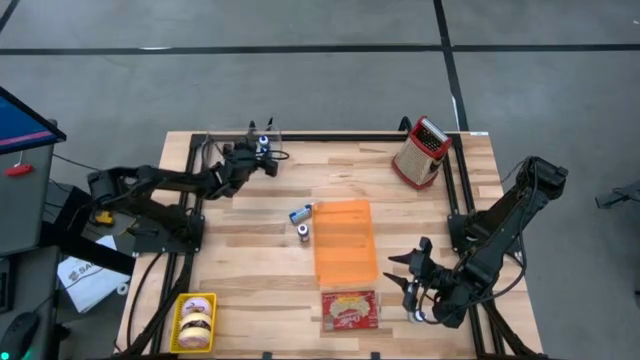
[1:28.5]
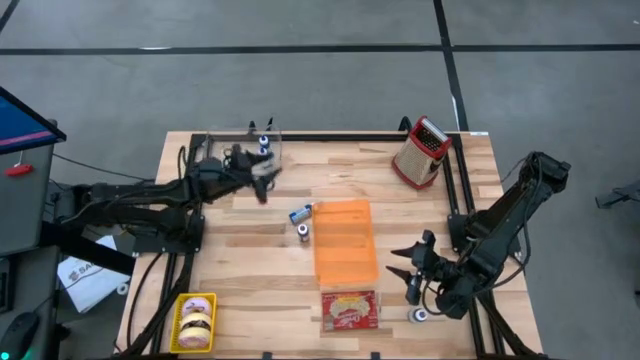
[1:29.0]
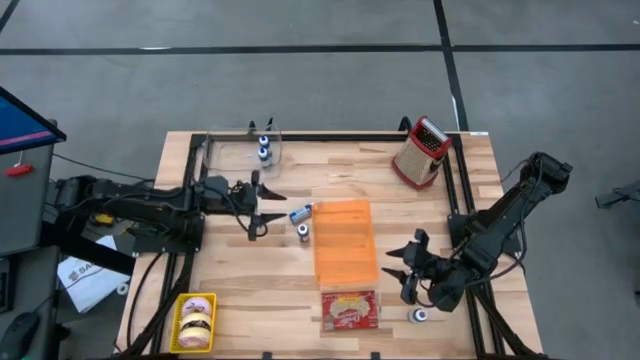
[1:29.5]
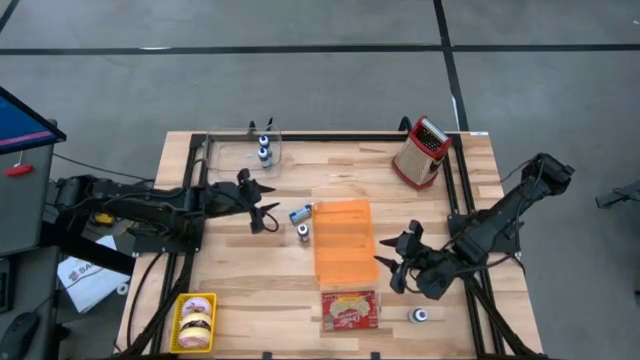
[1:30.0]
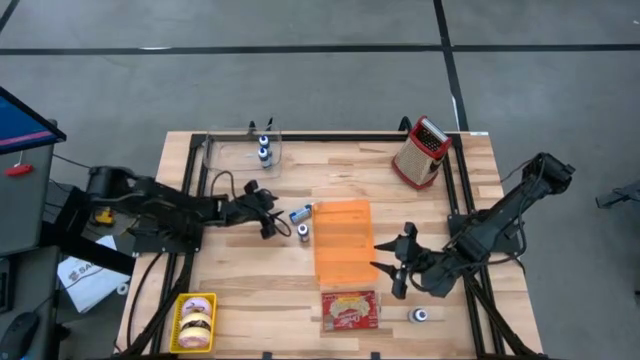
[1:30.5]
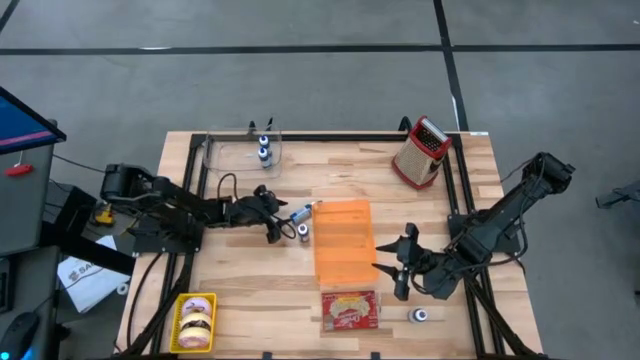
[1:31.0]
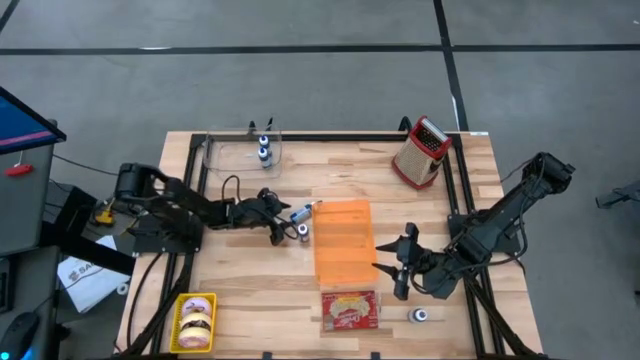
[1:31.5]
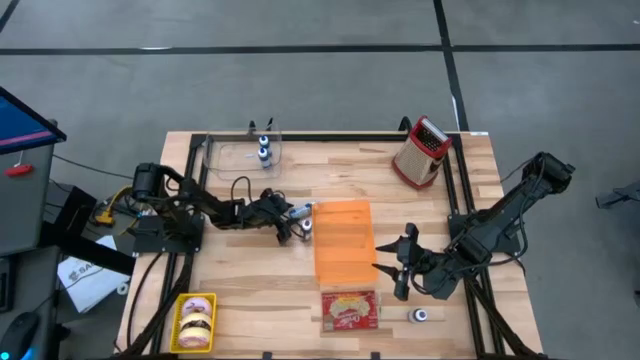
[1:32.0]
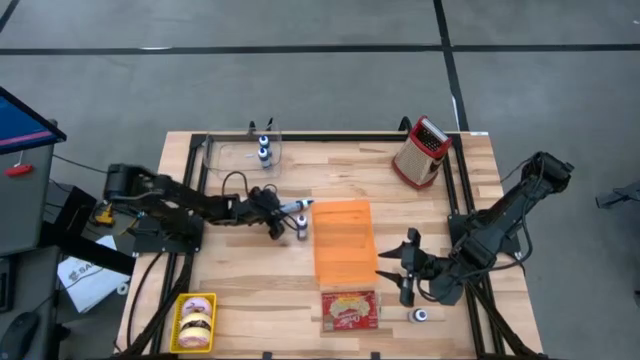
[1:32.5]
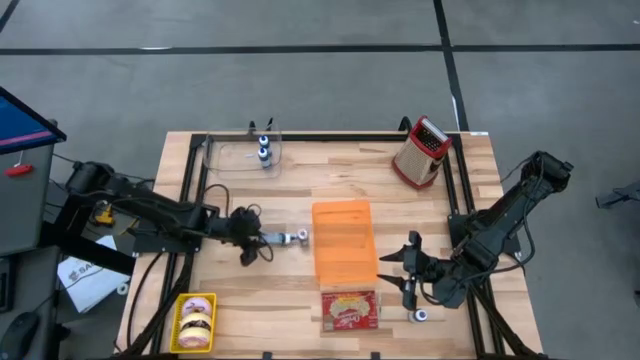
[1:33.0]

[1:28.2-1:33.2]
Task: Pick & Place Food Item
Move the blue food coloring bottle to the center left of the table

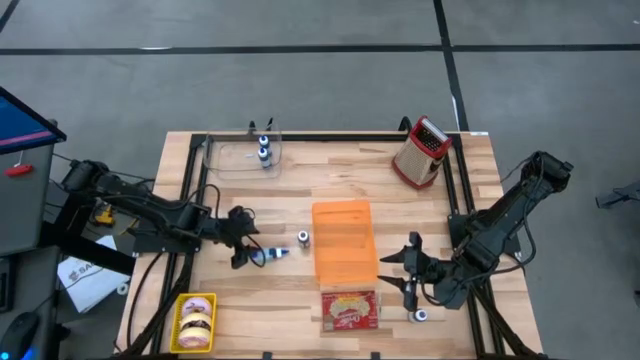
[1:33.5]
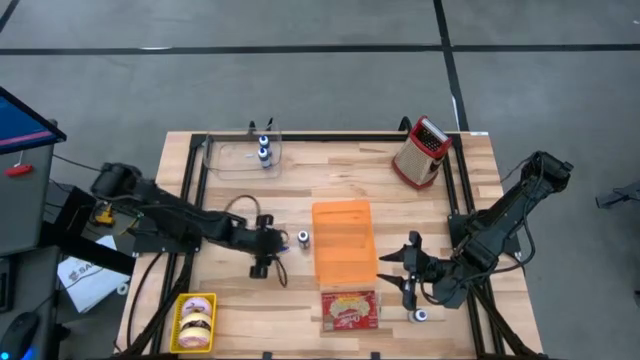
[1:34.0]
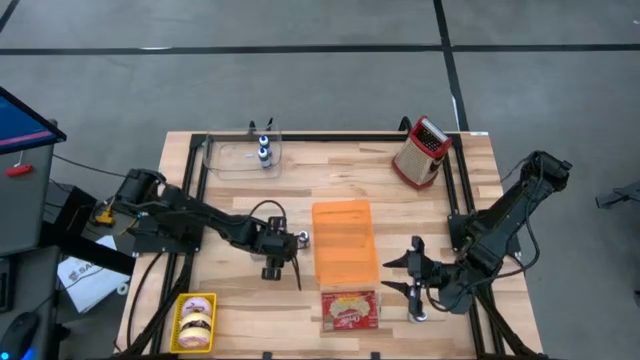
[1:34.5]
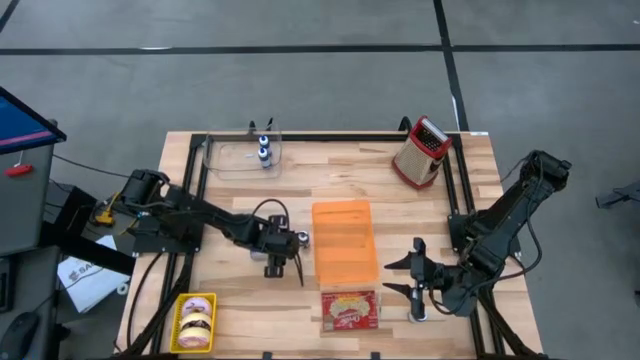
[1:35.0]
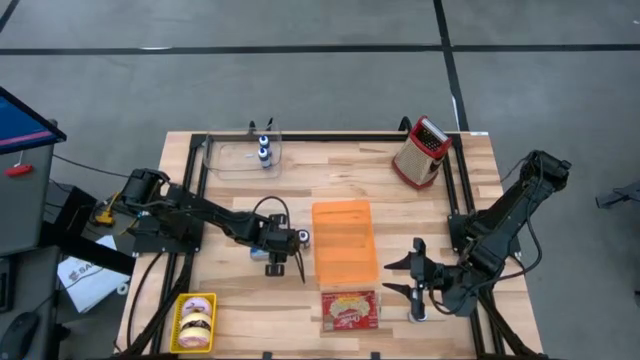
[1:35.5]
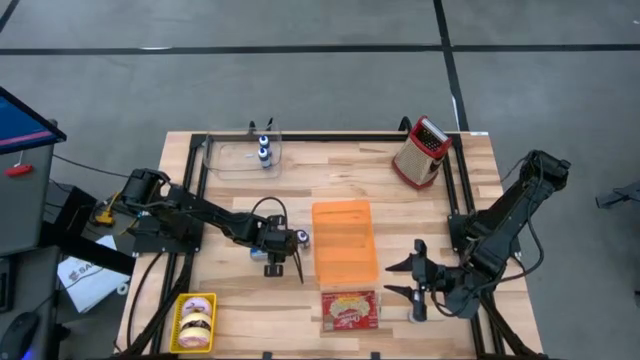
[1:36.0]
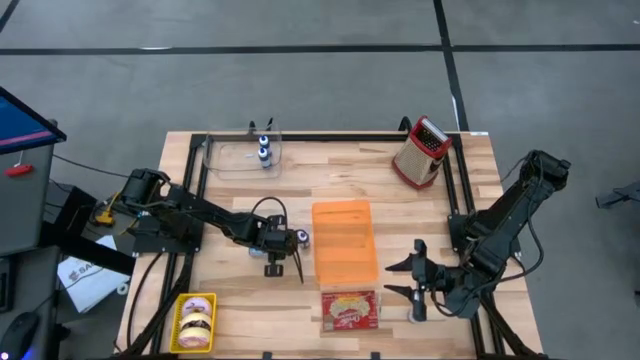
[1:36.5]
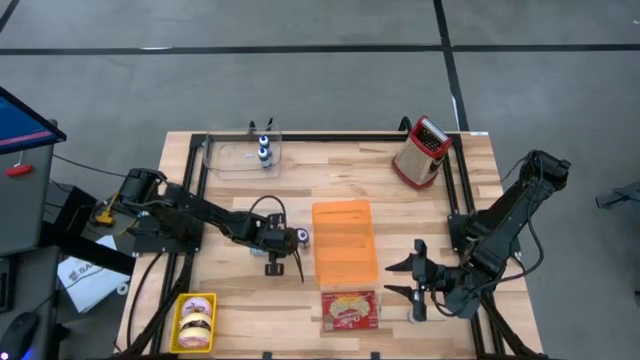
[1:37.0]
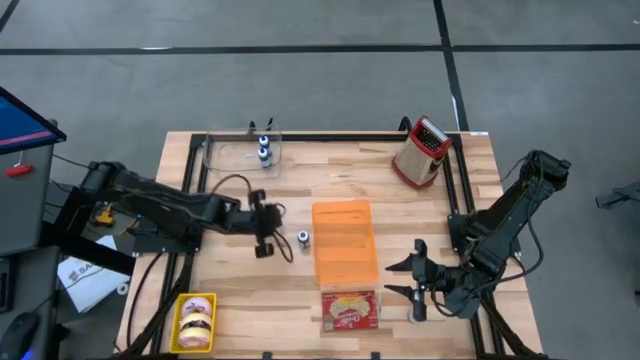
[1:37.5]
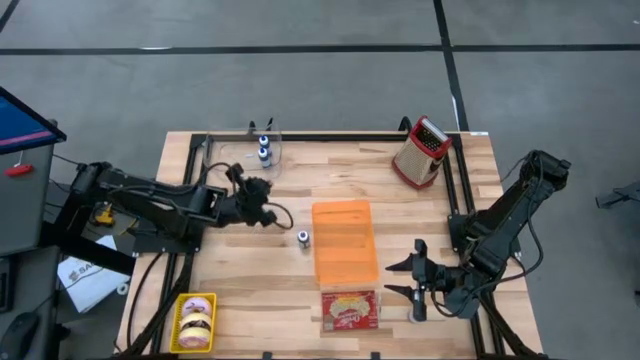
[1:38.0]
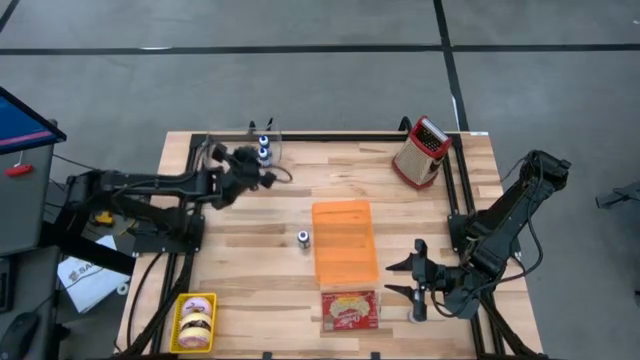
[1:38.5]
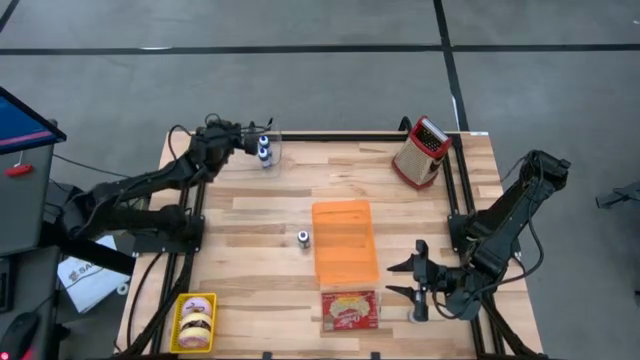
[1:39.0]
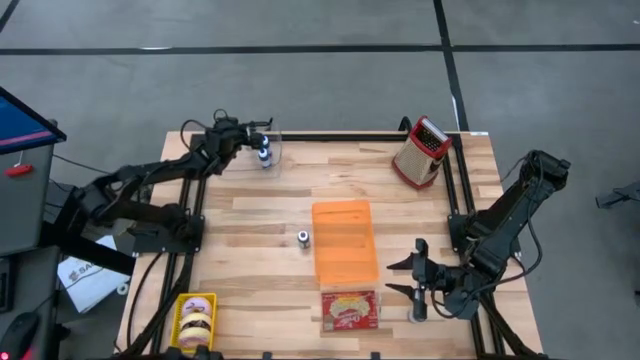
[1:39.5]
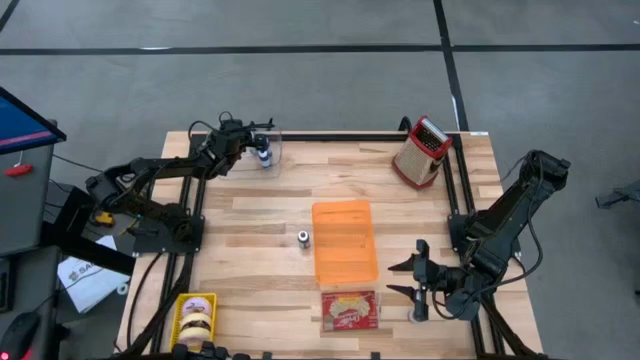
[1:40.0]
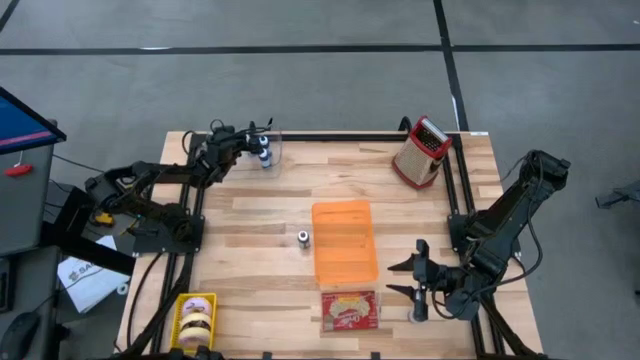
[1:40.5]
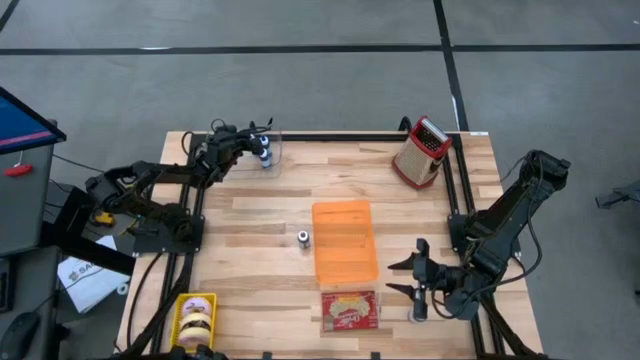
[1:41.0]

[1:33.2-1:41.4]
Put the blue food coloring bottle into the transparent bin

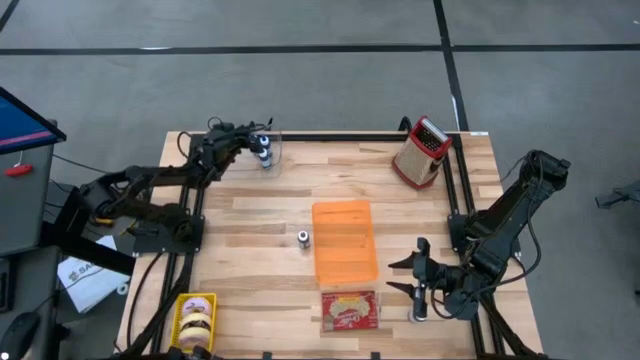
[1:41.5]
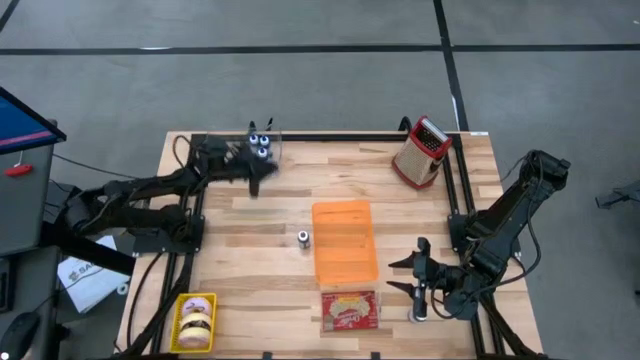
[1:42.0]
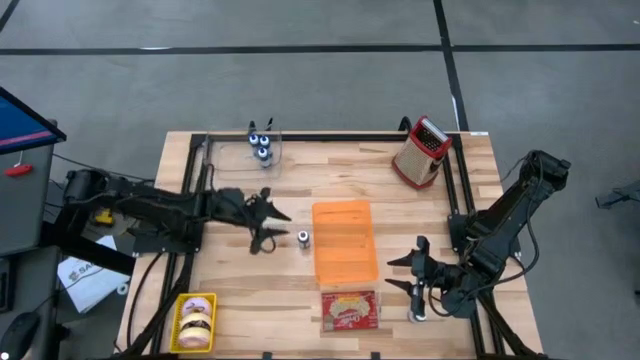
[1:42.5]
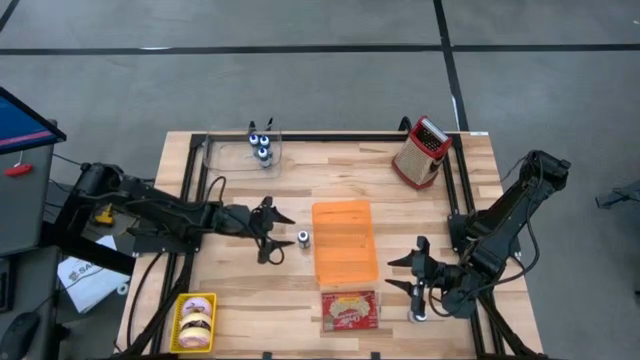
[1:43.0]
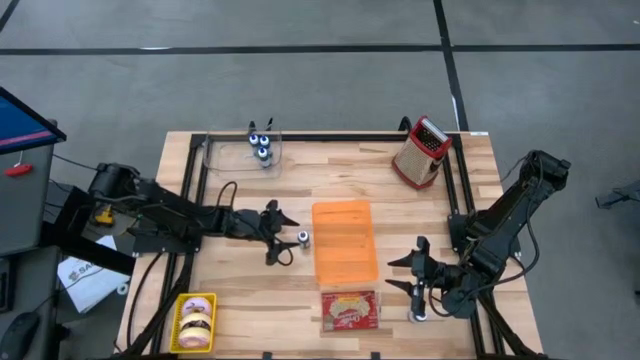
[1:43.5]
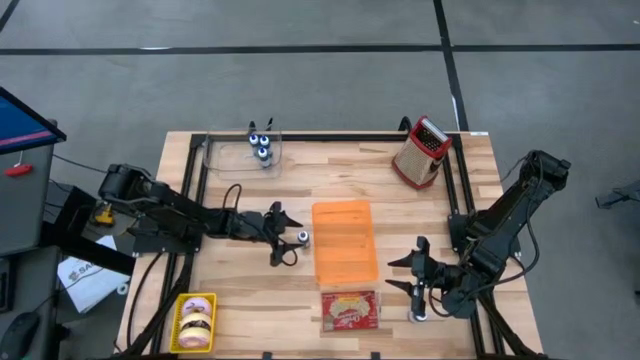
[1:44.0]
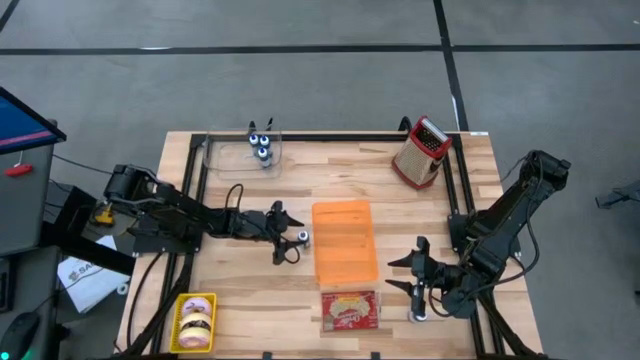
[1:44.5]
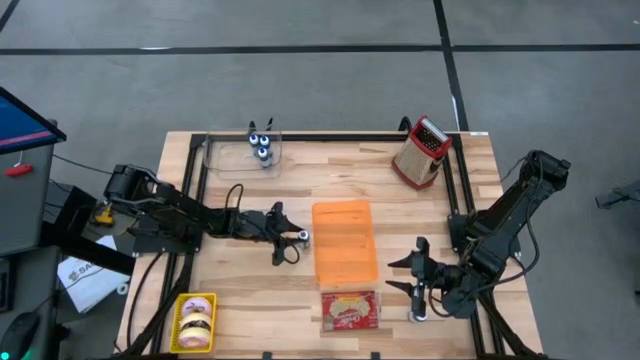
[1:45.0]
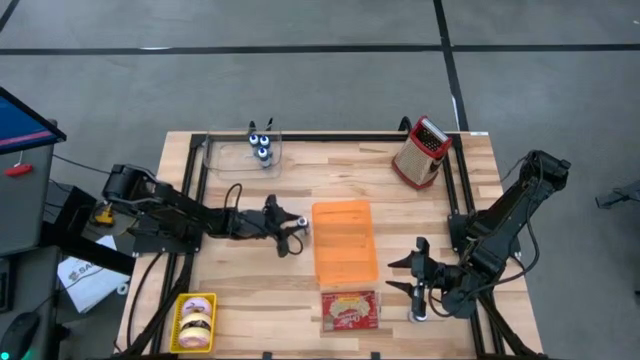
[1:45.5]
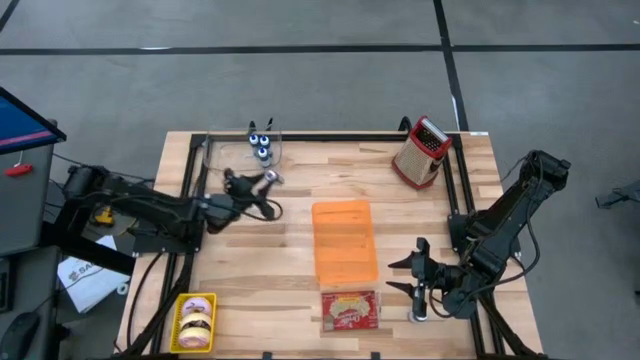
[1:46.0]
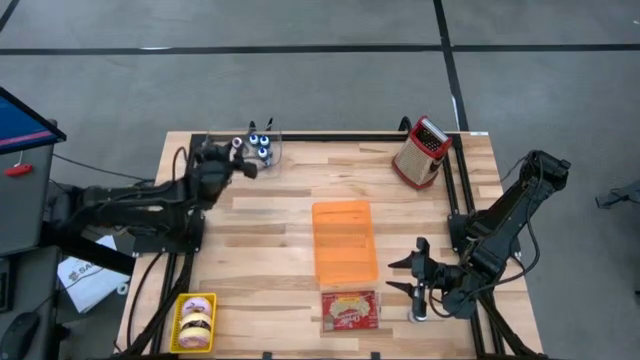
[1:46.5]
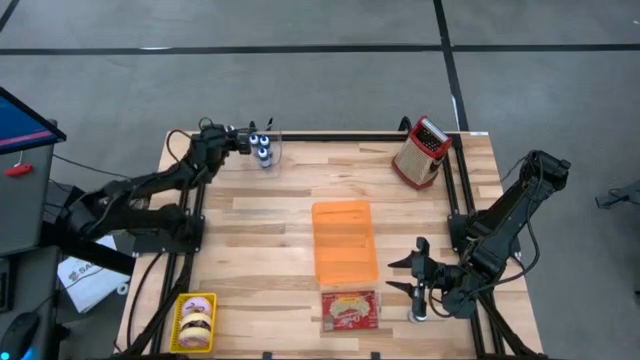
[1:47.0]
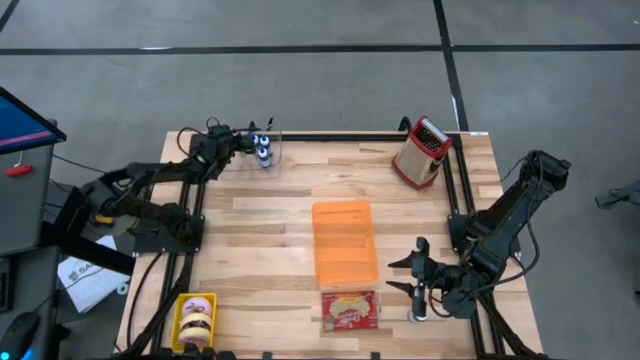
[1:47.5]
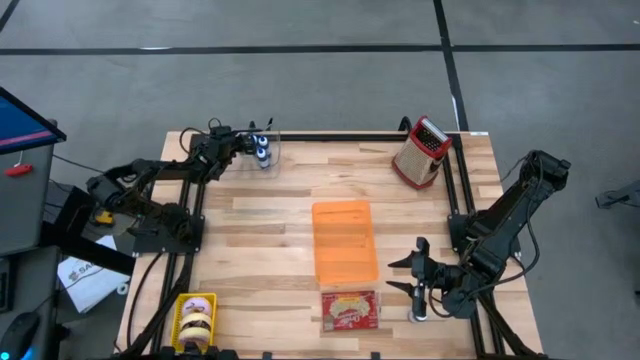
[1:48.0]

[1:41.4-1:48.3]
Put the left violet food coloring bottle into the transparent bin

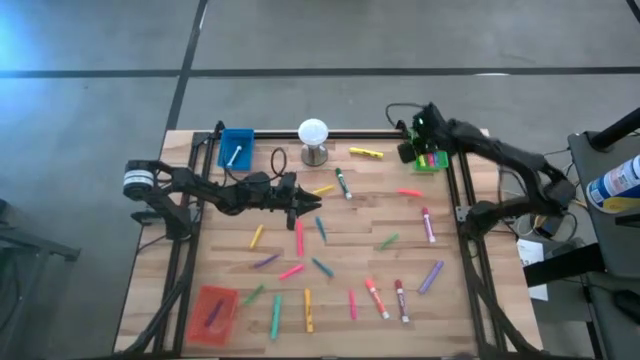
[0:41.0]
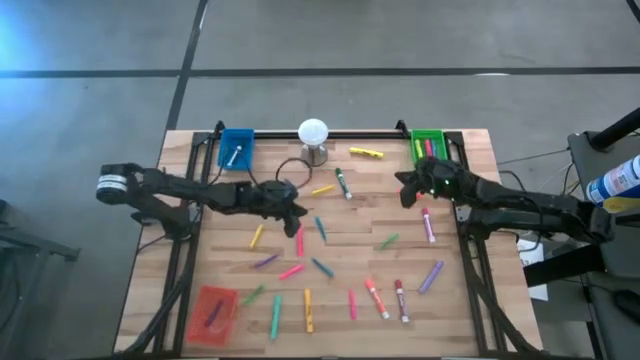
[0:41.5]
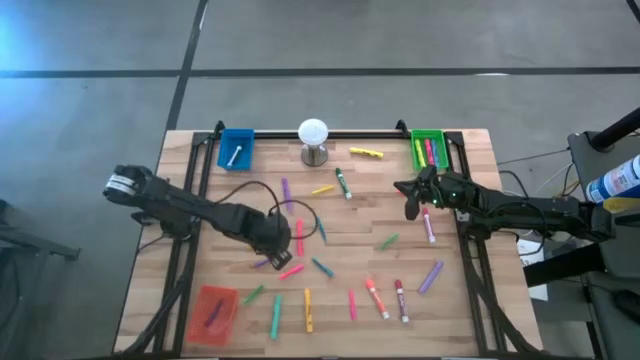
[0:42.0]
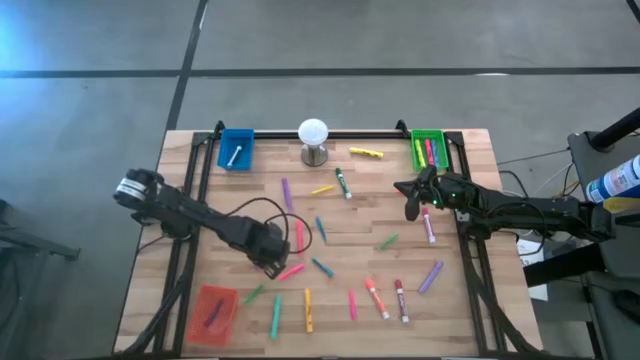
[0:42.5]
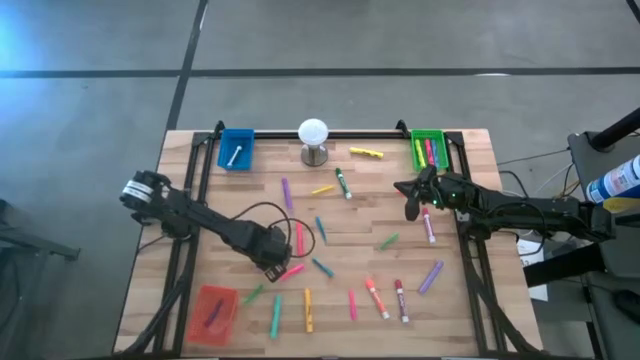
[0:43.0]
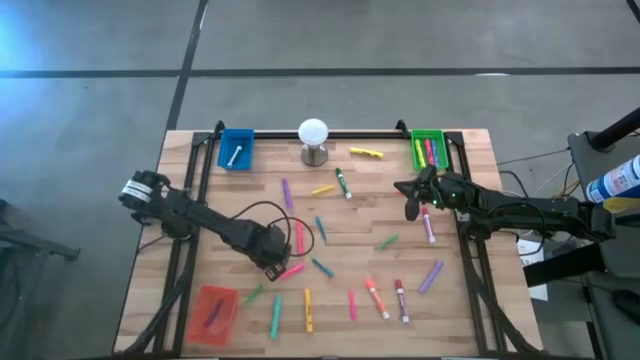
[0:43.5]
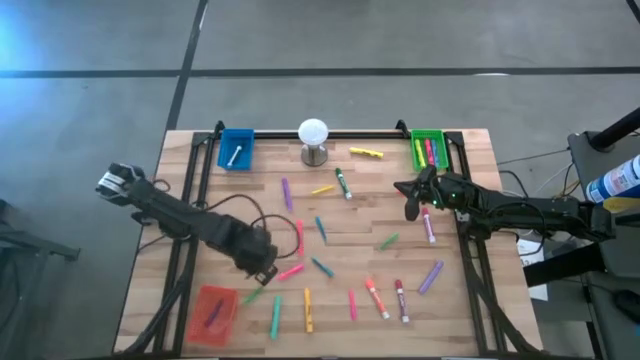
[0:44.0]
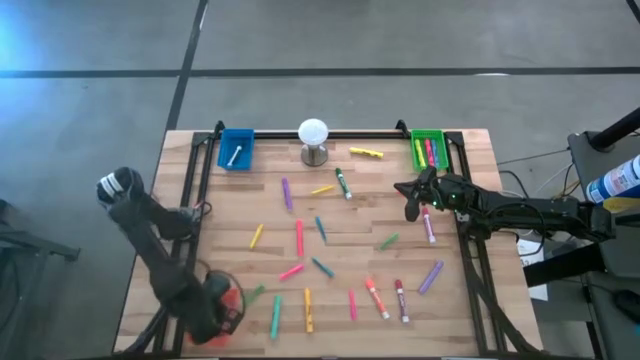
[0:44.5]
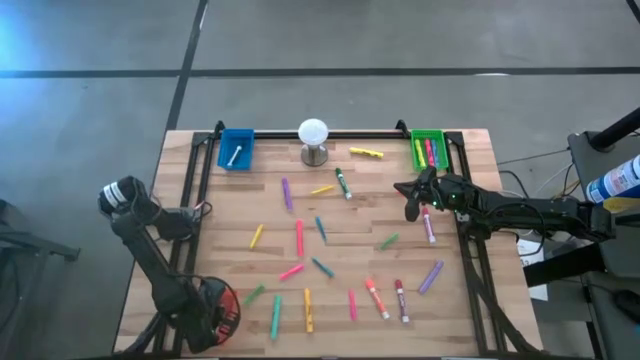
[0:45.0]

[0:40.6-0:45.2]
Task: Pick & Place Markers
Put the violet pen into the orange bin
